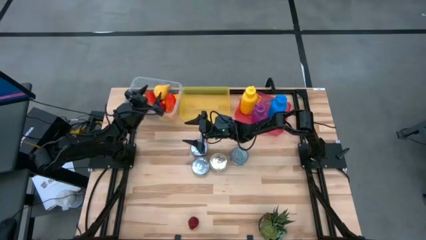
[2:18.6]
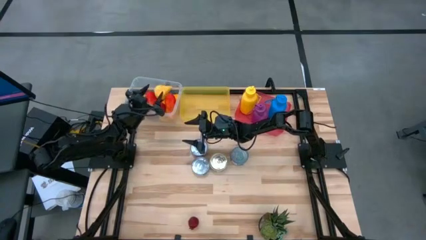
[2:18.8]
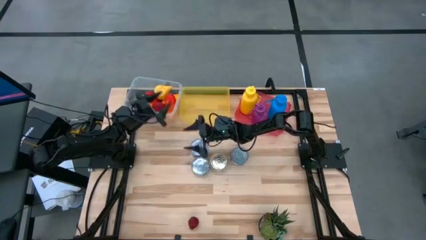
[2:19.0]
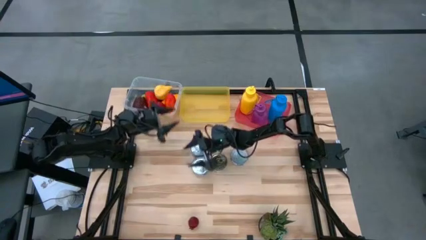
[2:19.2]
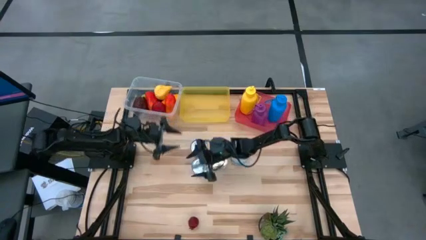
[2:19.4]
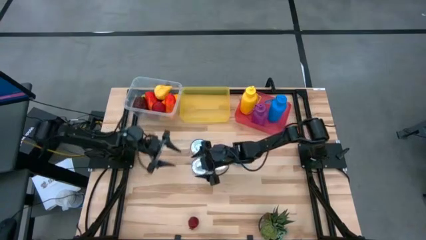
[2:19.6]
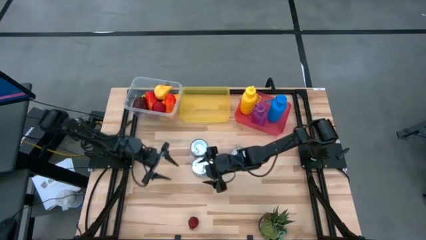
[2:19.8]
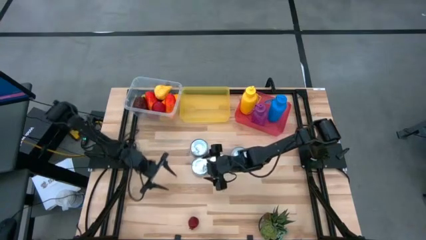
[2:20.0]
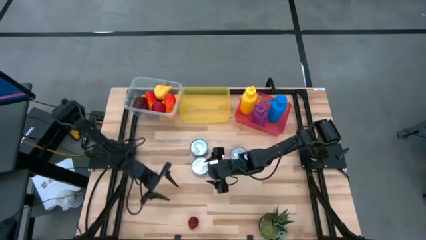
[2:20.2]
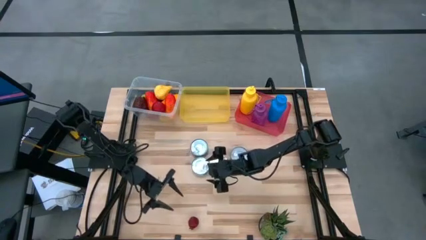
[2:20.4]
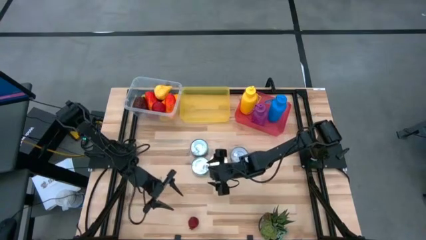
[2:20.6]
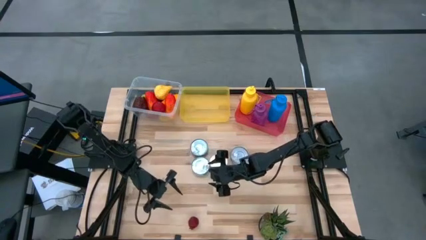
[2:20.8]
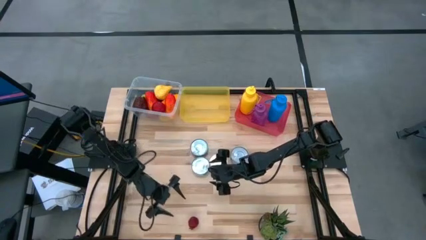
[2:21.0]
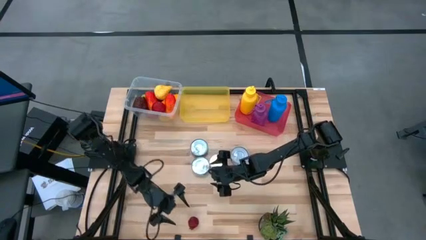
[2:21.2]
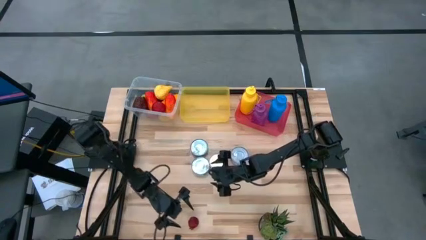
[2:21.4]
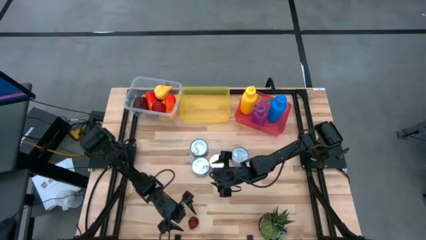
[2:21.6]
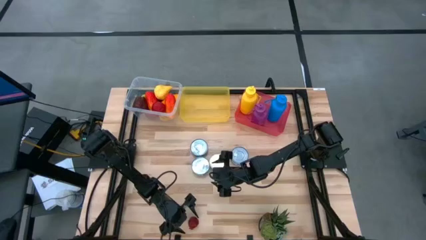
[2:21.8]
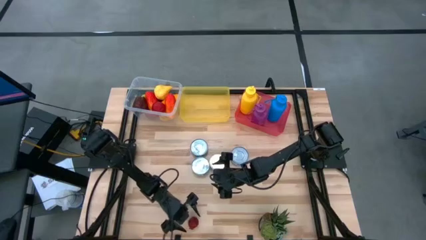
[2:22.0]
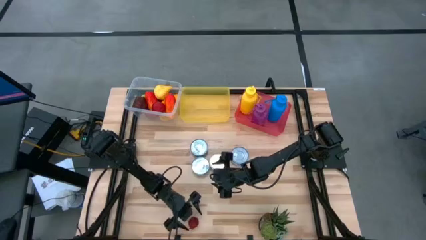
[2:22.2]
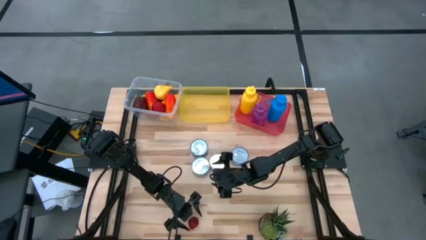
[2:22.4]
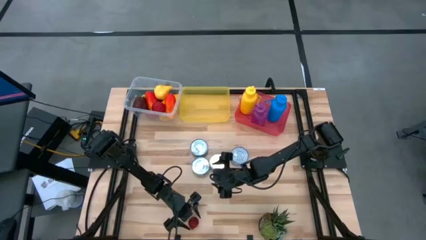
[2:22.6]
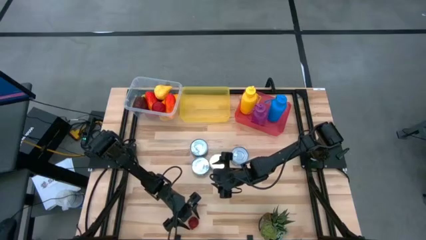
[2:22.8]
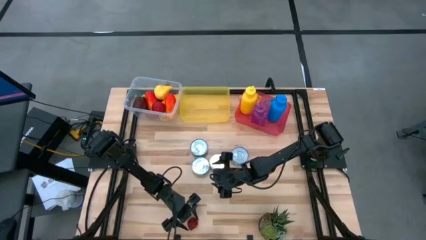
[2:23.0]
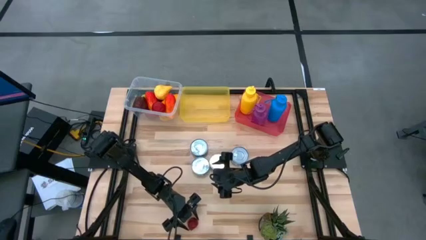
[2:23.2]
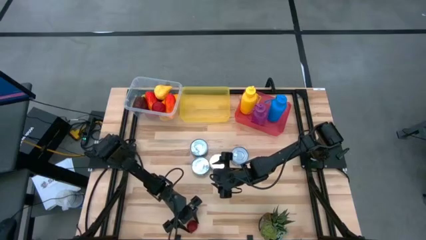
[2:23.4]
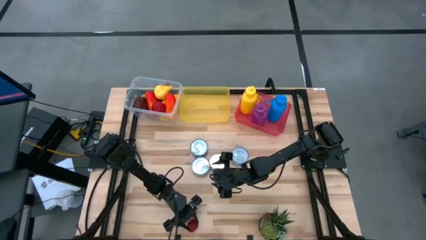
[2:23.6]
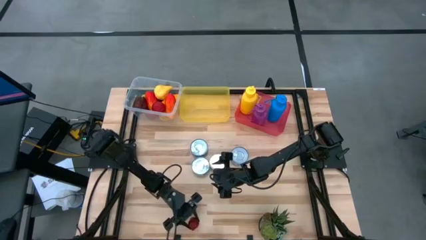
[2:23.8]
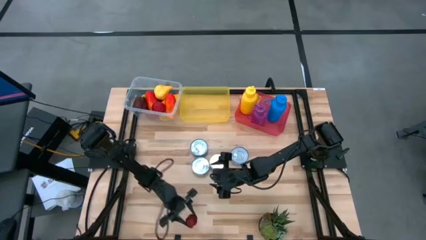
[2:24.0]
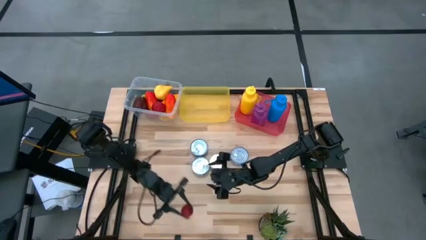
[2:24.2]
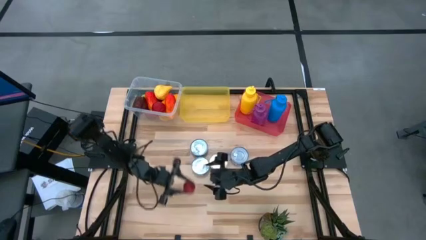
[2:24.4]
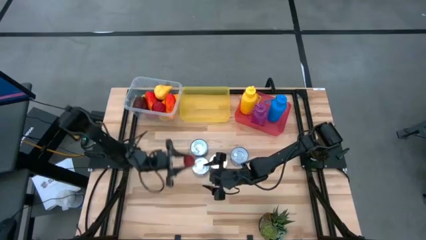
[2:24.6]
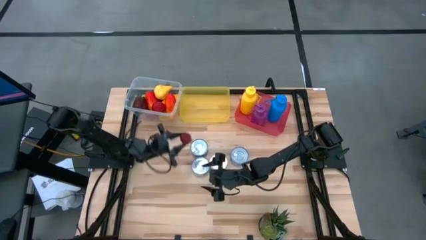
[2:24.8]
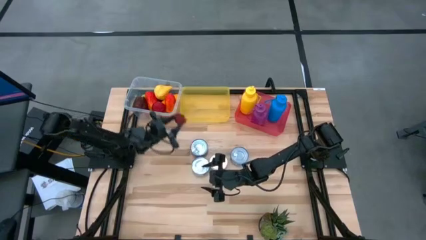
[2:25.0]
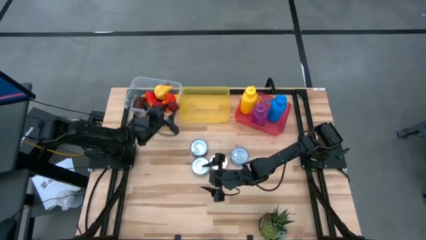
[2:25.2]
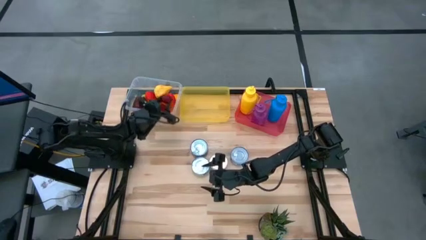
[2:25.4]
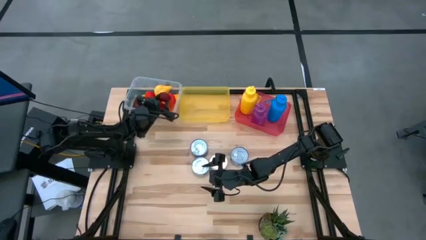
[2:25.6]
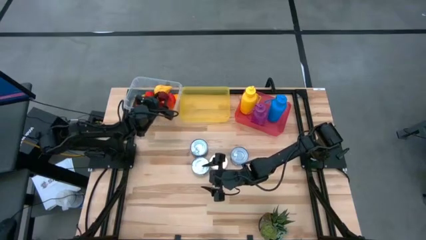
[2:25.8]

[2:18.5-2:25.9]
Task: Pick & Place Food Item
Put the red pomegranate into the transparent bin

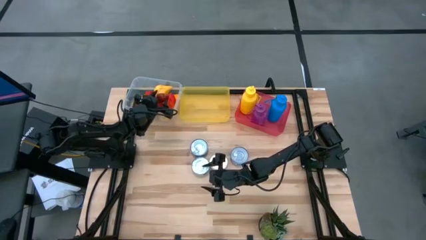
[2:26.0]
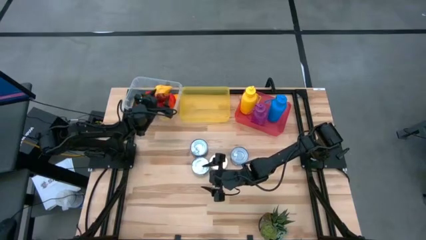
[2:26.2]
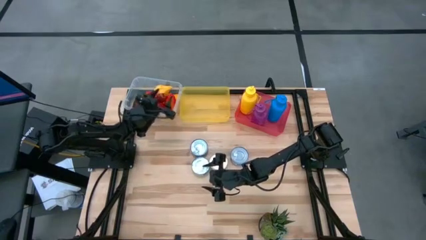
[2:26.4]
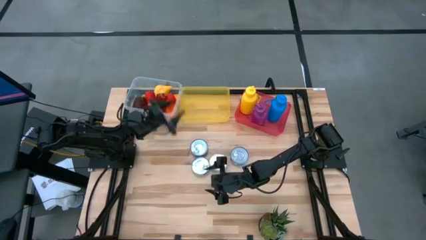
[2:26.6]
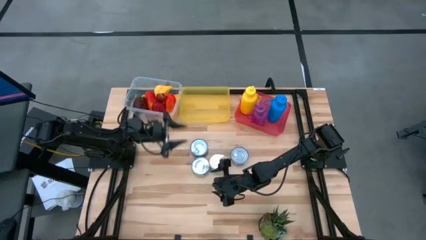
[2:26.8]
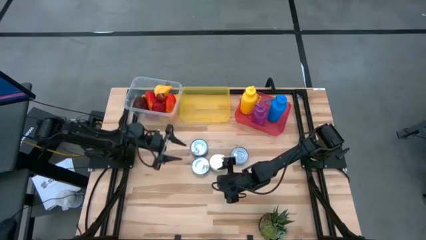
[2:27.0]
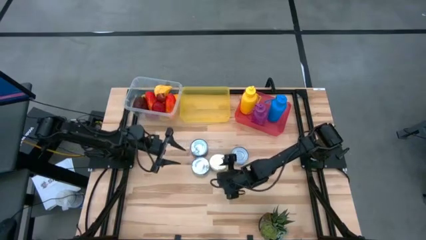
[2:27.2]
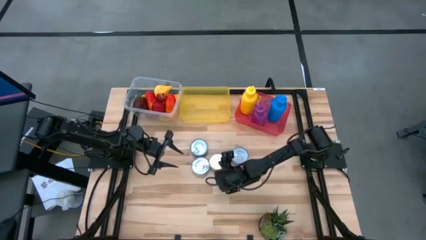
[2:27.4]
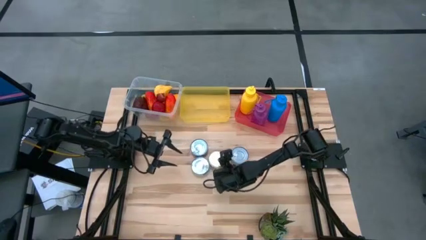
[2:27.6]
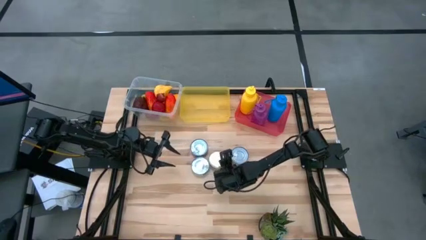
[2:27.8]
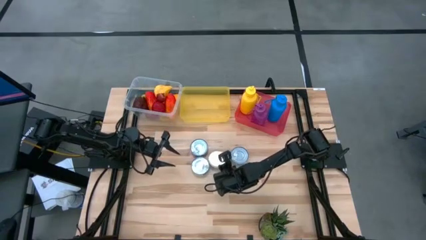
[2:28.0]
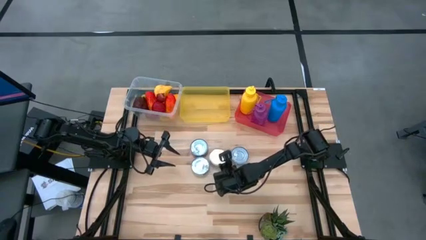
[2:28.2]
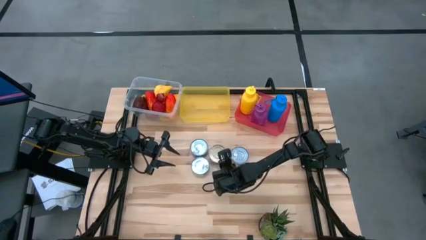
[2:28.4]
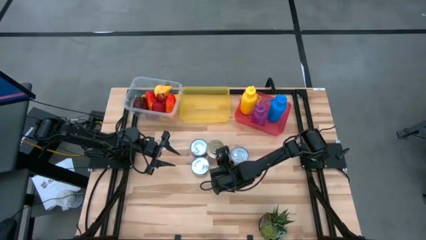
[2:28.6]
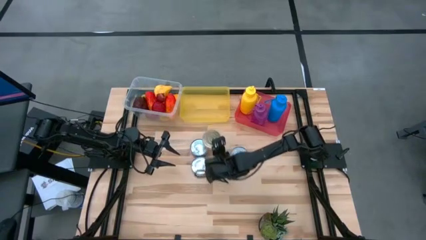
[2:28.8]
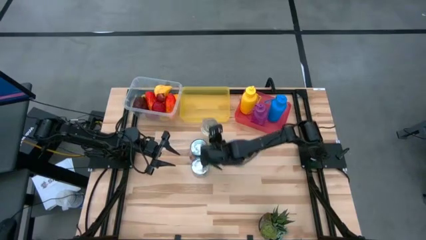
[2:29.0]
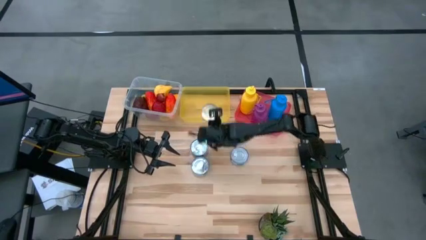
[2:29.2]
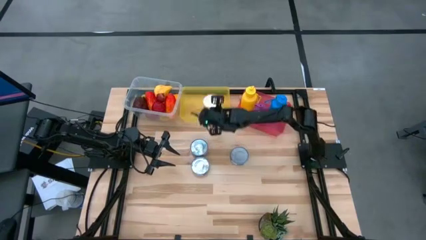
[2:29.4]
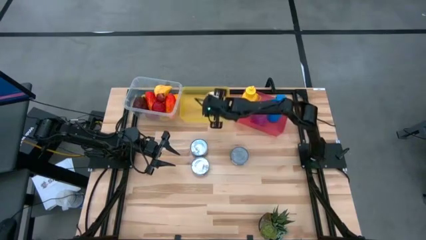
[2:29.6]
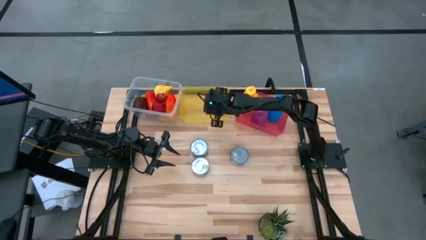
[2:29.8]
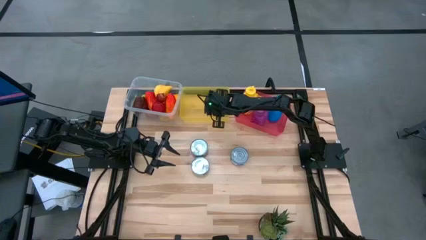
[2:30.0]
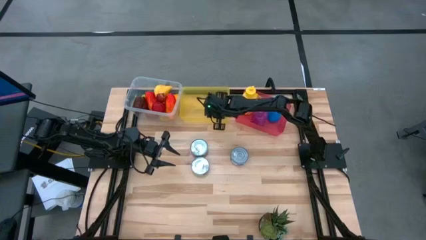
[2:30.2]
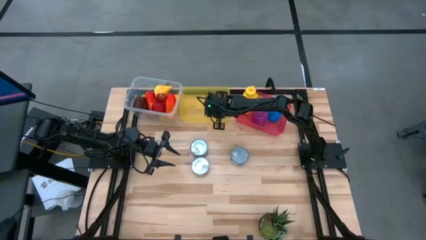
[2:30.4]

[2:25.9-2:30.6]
Put the blue and pink tuna can into the yellow bin

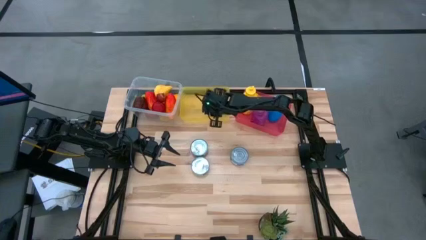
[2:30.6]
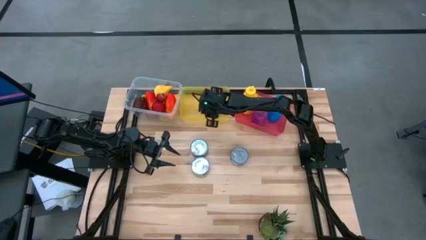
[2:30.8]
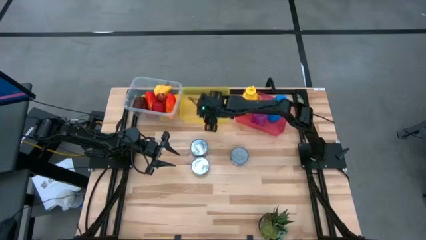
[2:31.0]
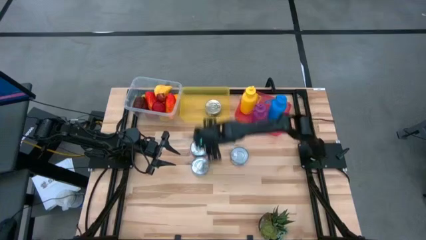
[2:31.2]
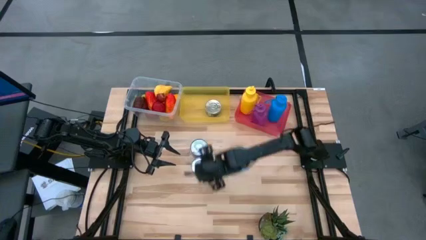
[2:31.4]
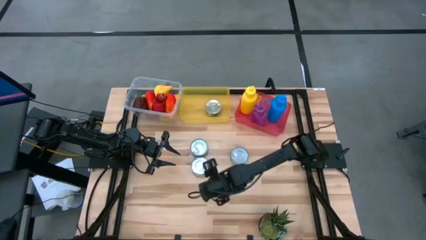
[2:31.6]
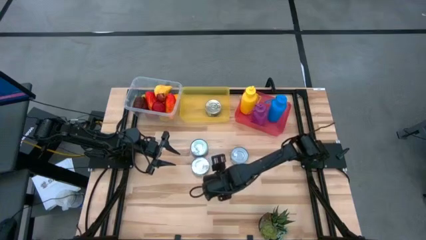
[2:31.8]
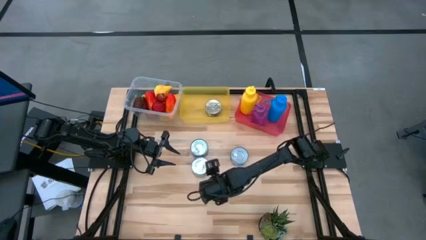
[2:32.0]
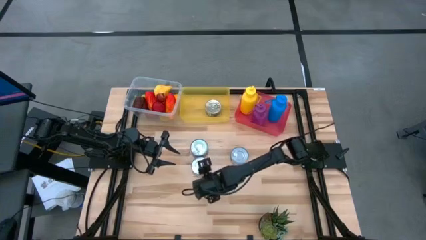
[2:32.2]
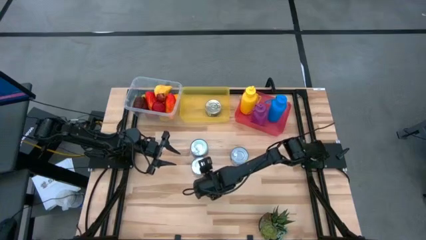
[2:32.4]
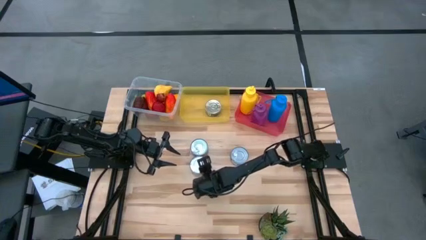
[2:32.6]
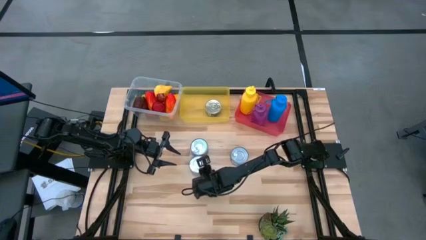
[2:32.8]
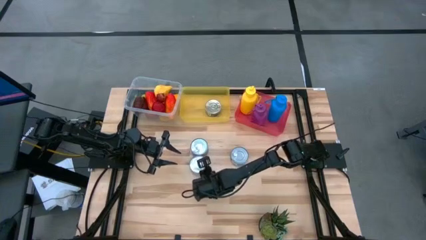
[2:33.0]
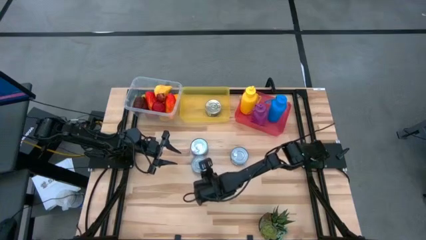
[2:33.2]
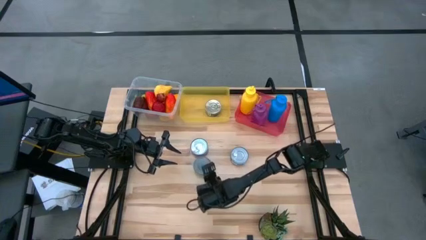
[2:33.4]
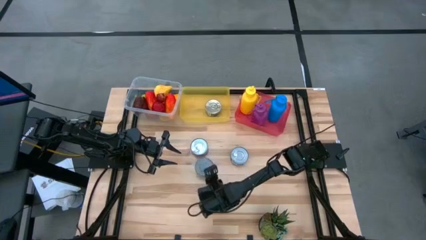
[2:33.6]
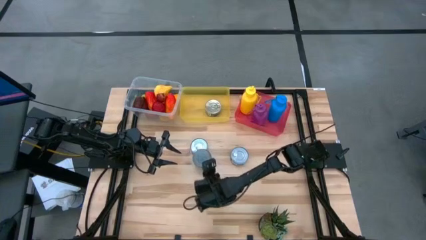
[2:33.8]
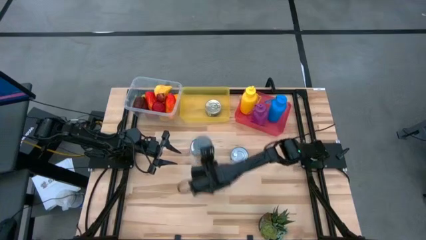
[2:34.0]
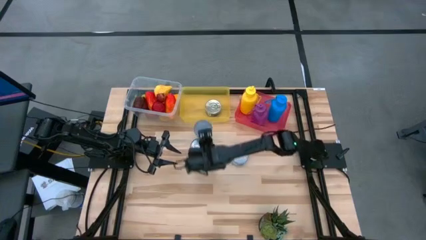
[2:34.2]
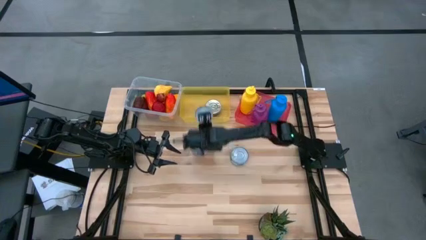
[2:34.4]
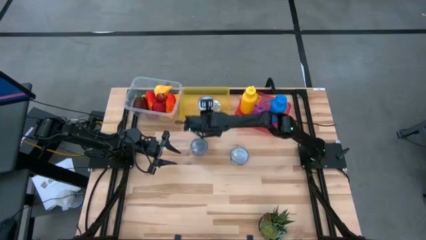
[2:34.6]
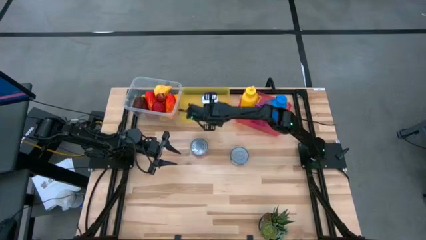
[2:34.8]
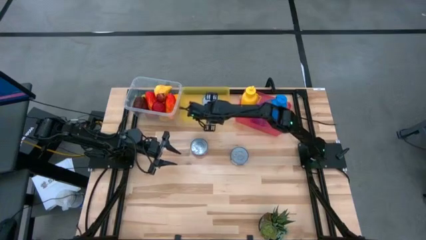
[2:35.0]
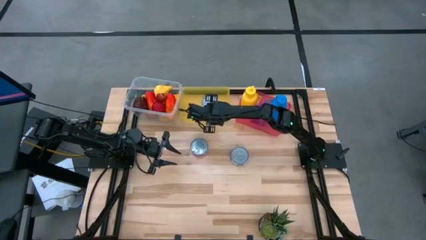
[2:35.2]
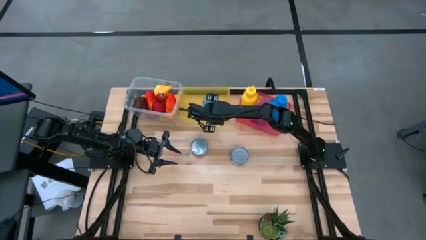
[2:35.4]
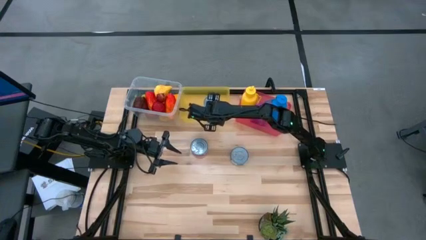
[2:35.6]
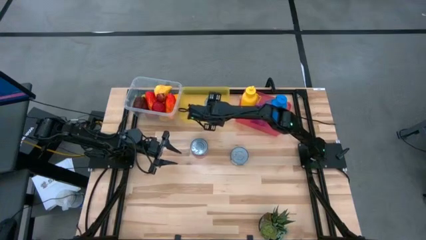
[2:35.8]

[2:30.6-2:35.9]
Put the green tuna can into the yellow bin
